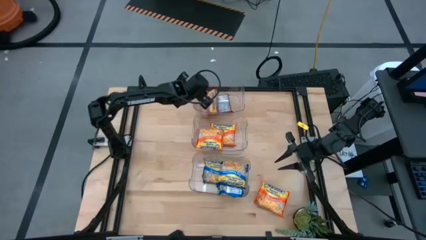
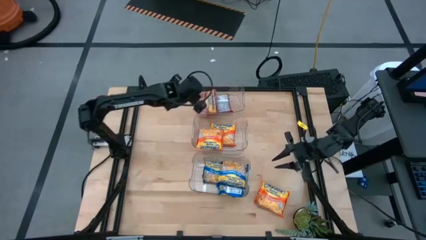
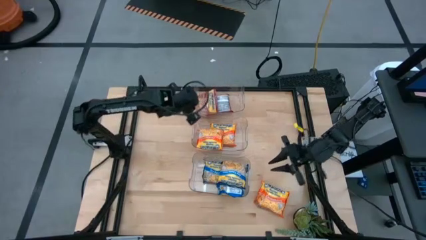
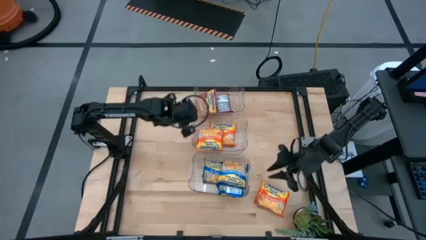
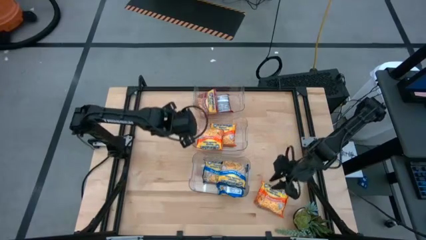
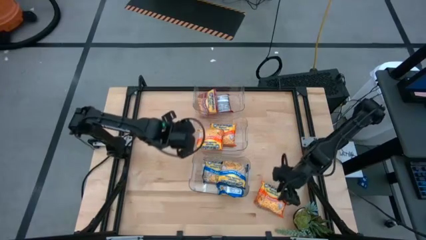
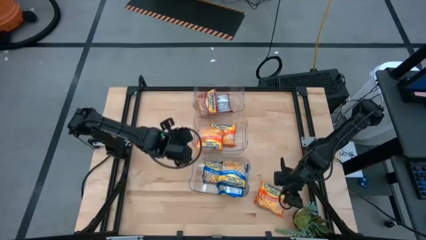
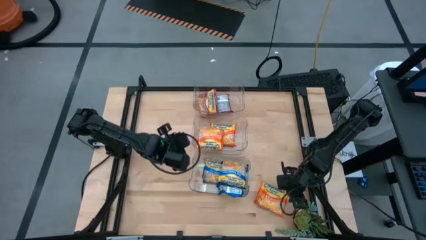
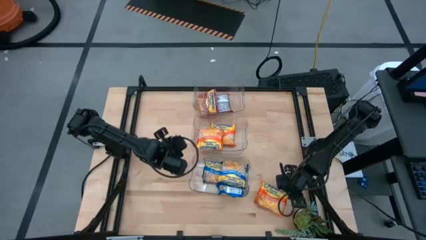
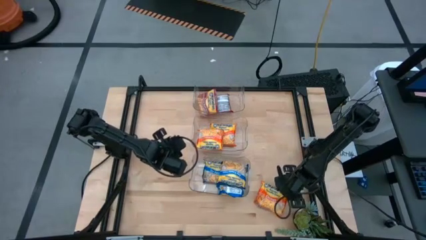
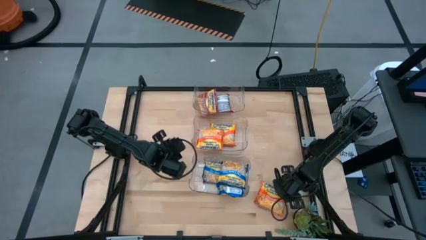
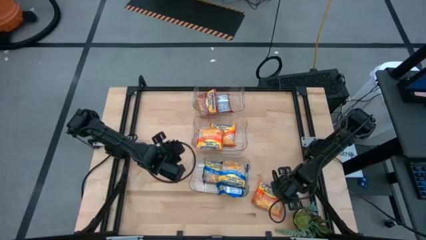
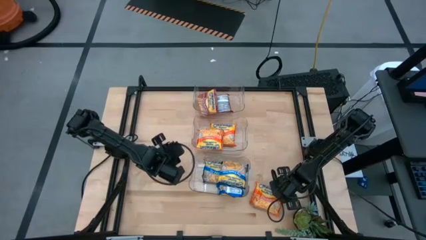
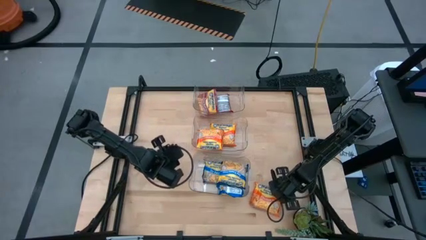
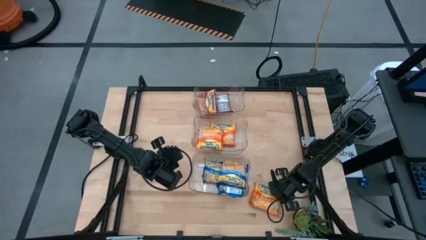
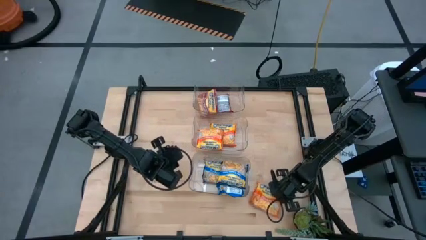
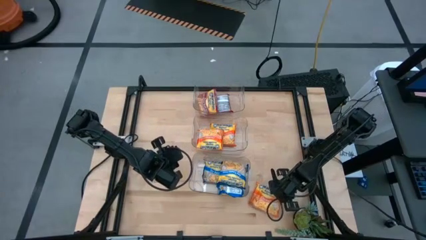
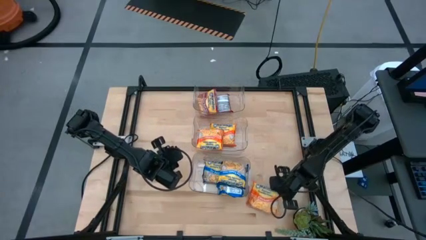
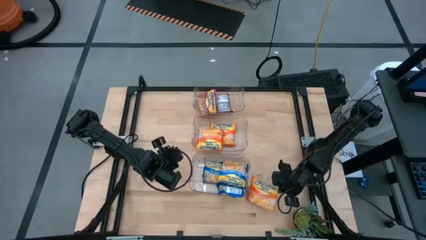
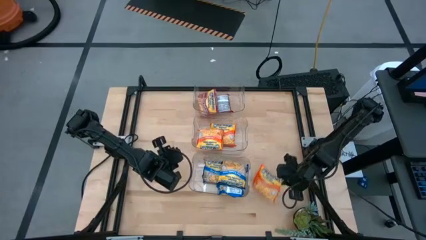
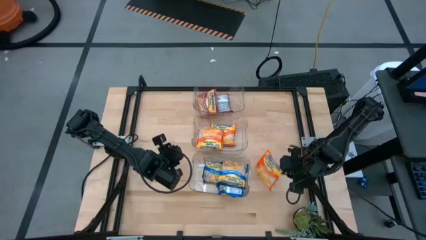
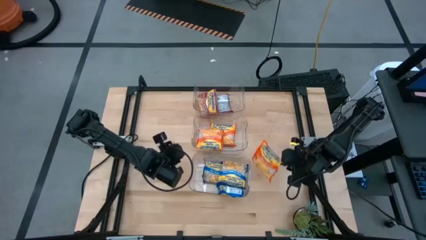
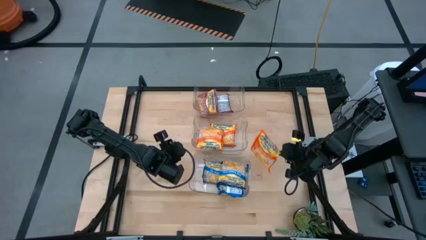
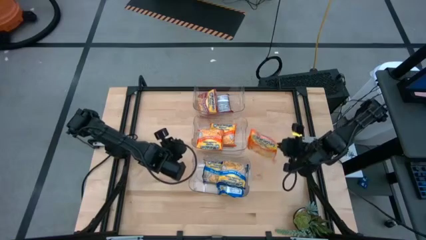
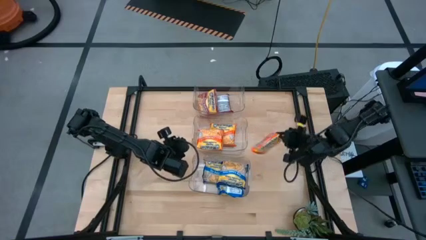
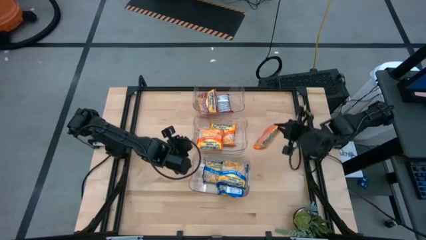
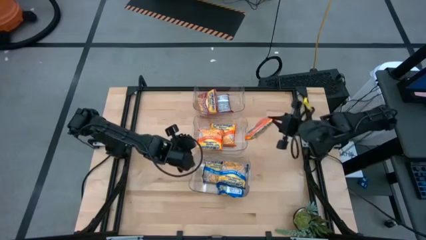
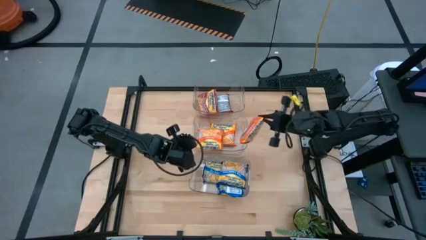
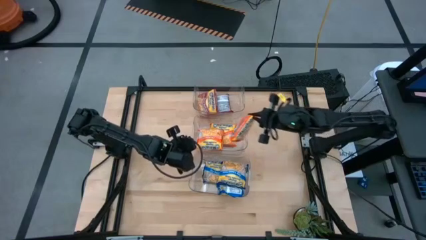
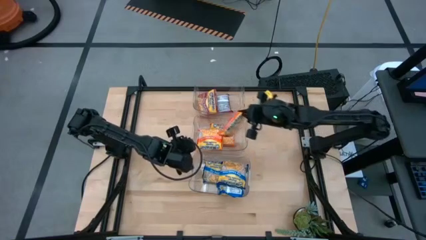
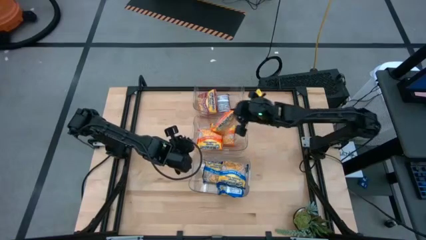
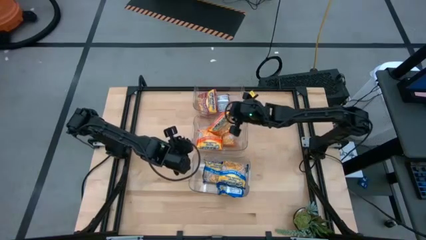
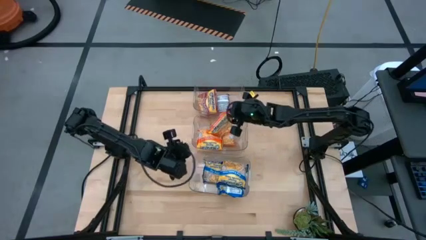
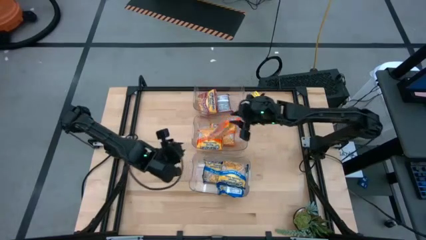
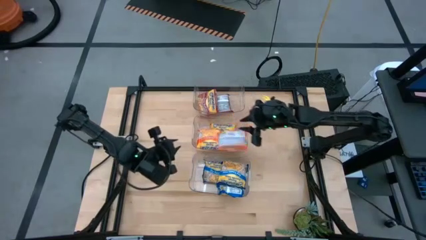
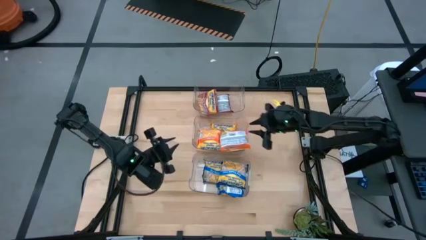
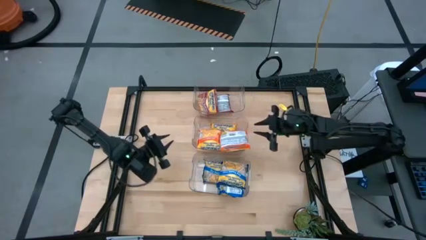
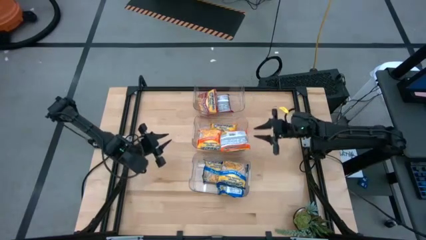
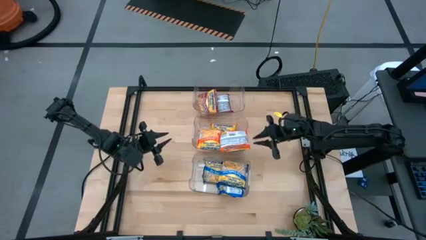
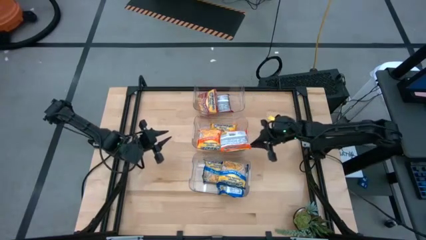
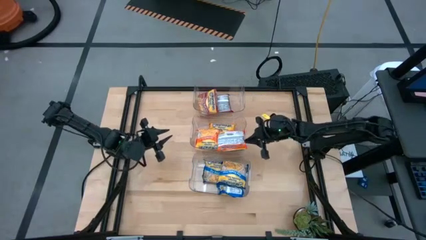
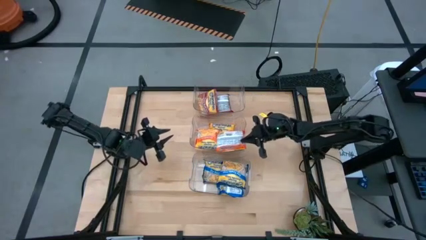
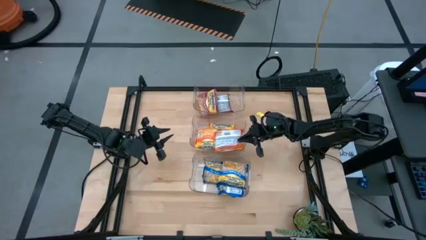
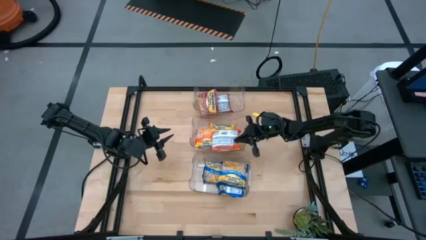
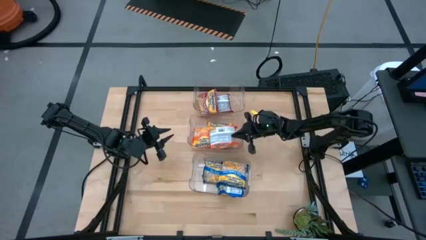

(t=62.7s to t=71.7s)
Task: Sort Maruchan noodles
Put the orange noodle pack into the center transparent bin

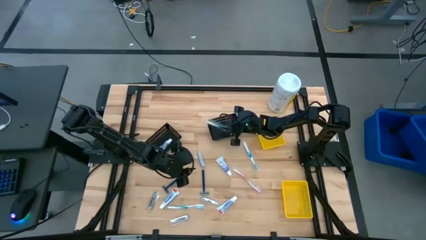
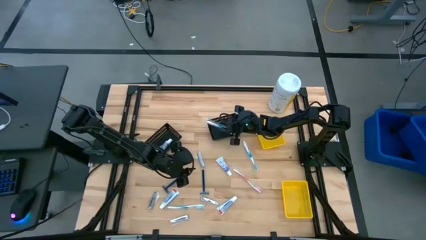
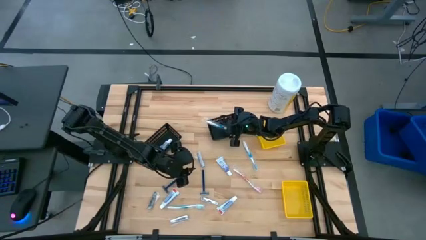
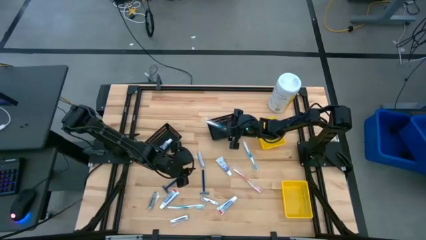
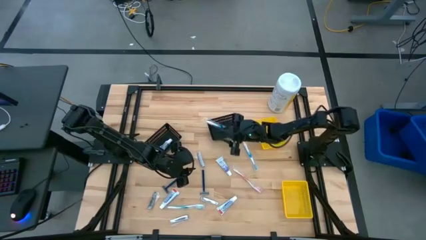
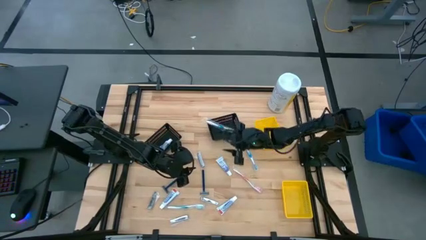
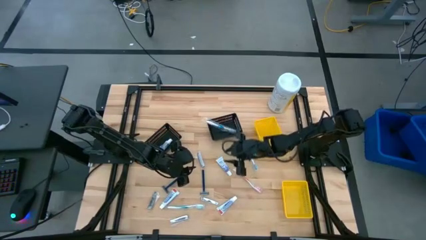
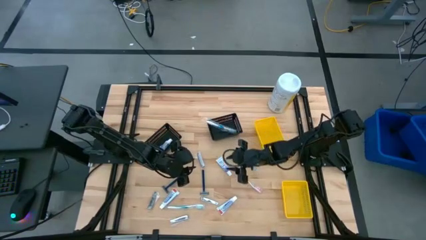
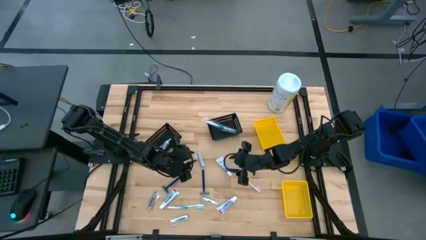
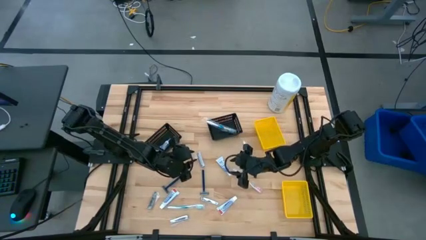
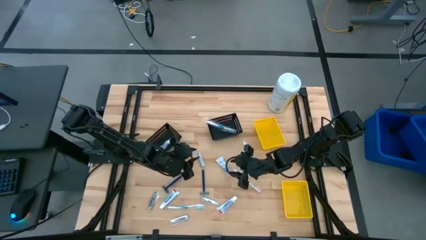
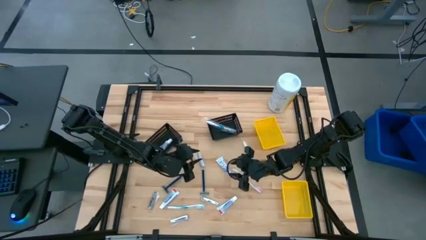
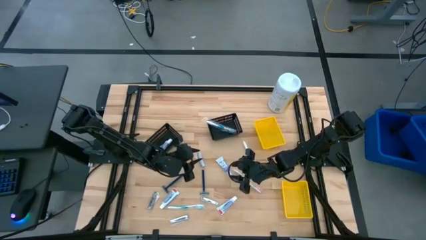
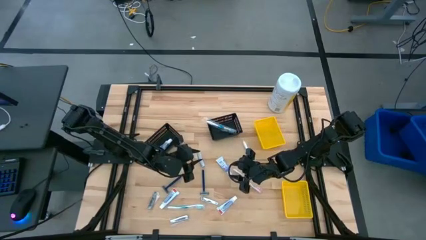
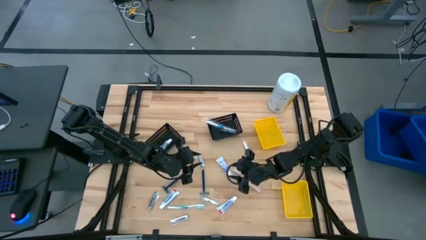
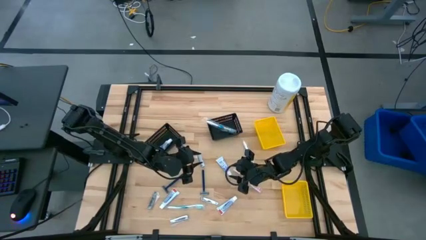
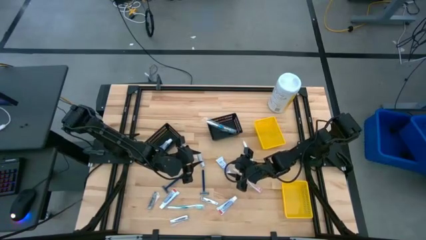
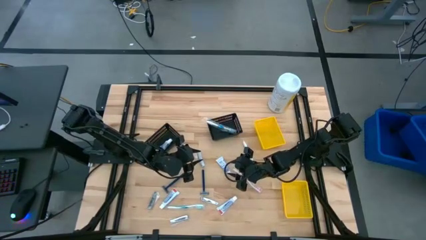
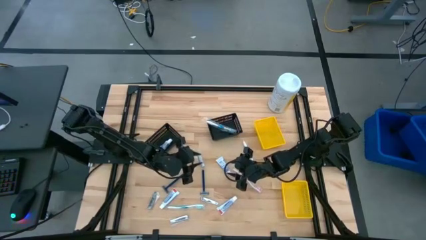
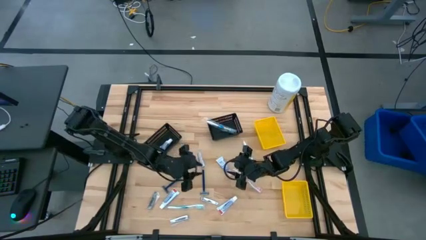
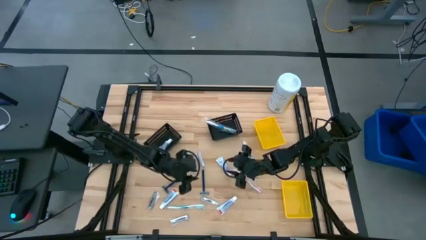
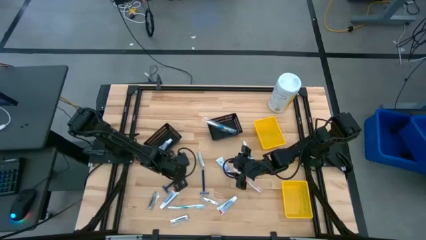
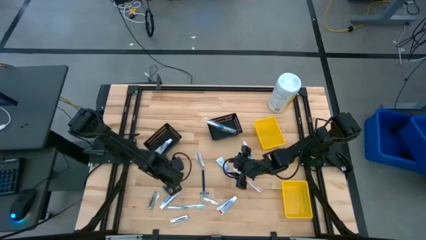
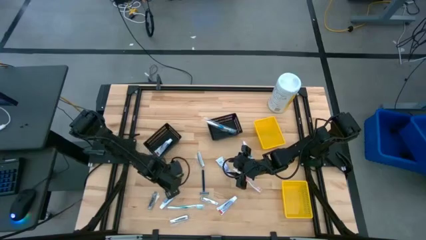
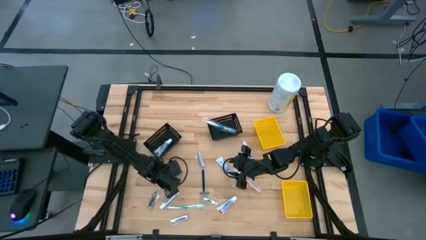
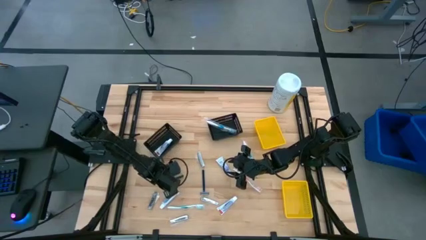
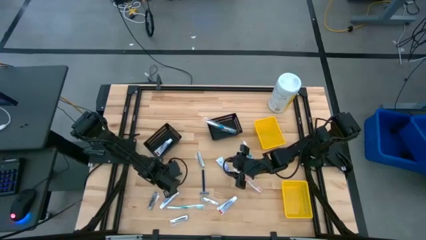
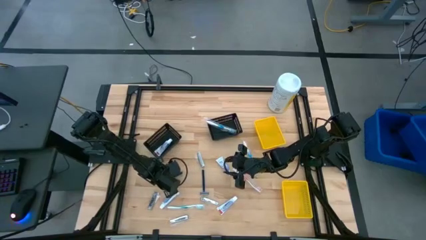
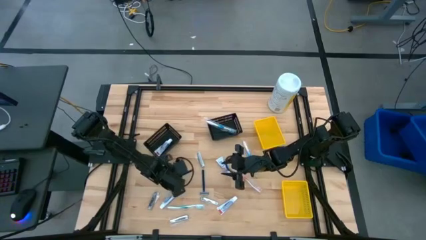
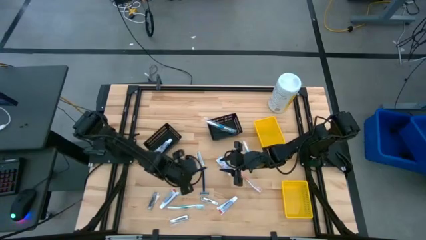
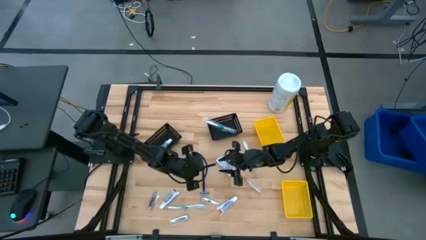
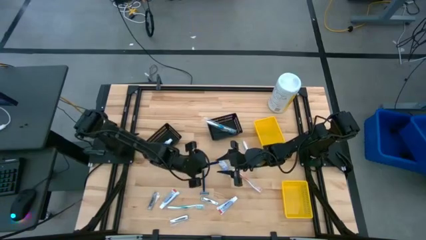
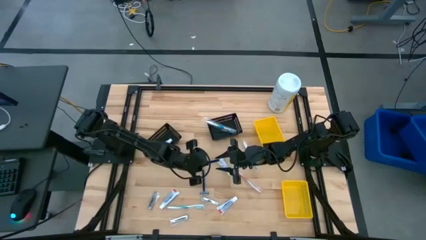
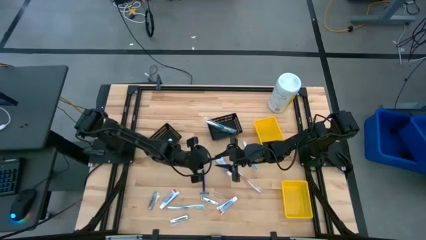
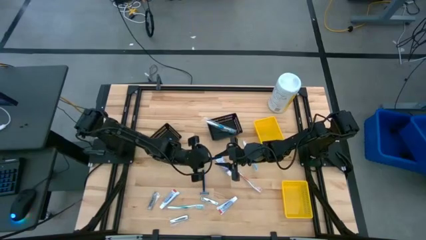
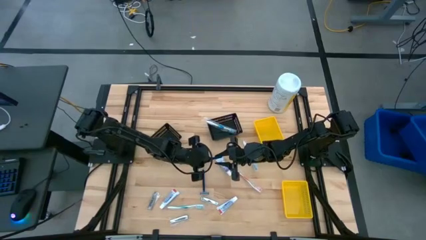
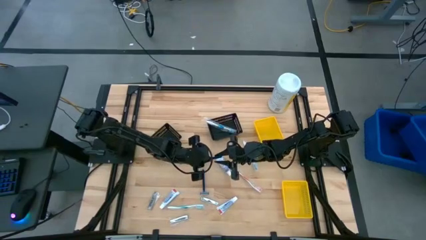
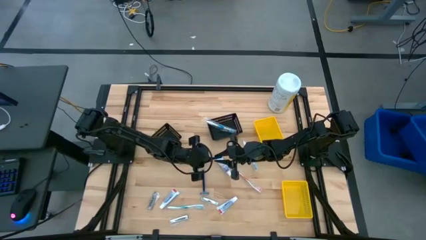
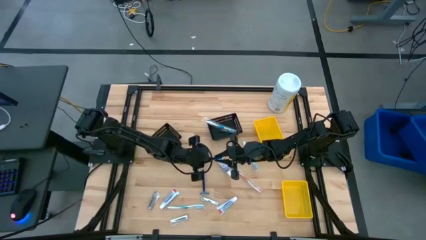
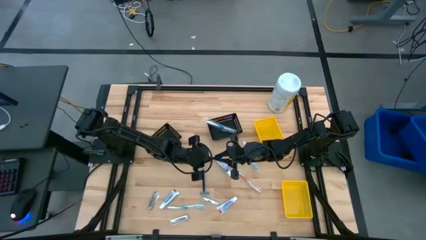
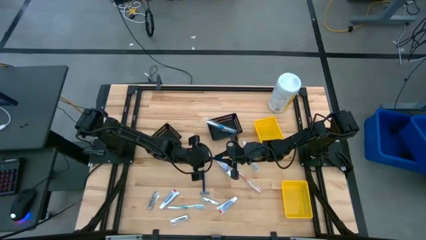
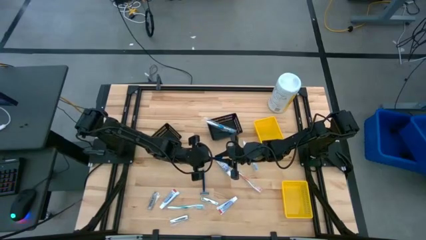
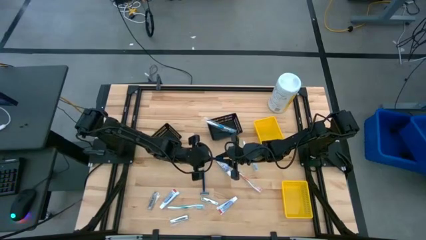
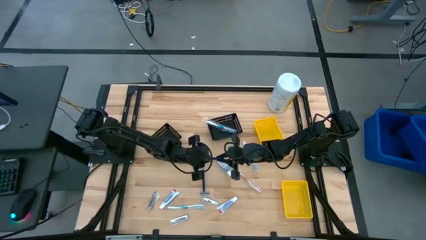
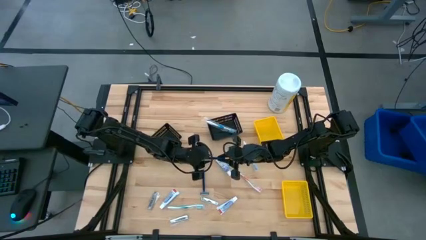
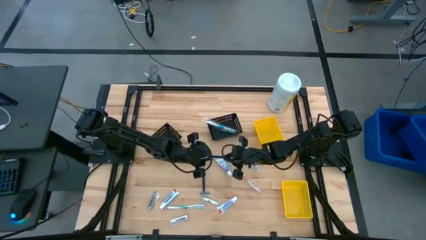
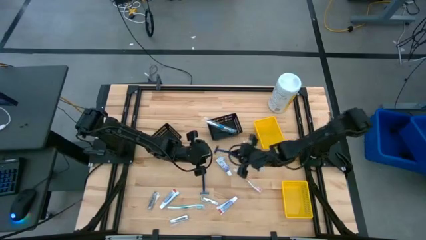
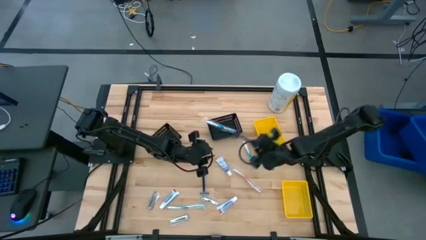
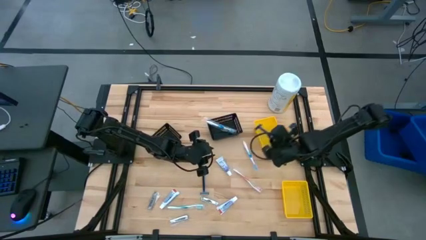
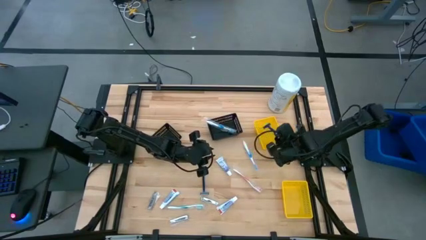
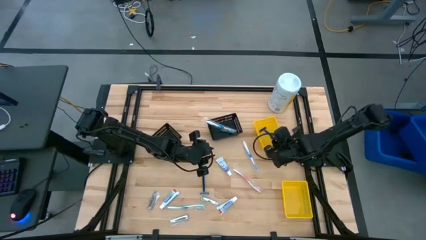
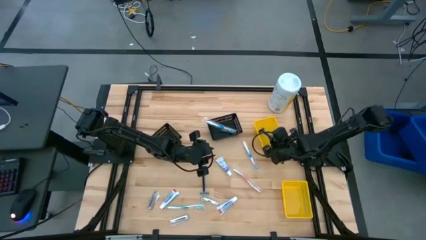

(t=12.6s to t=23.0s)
Task: Pick & Place Travel size toiletries
Put the blue razor into the top yellow basket
